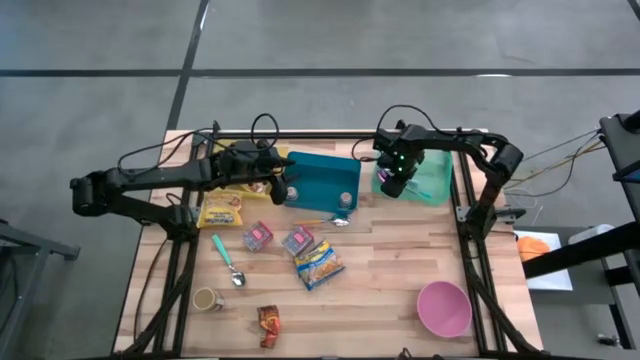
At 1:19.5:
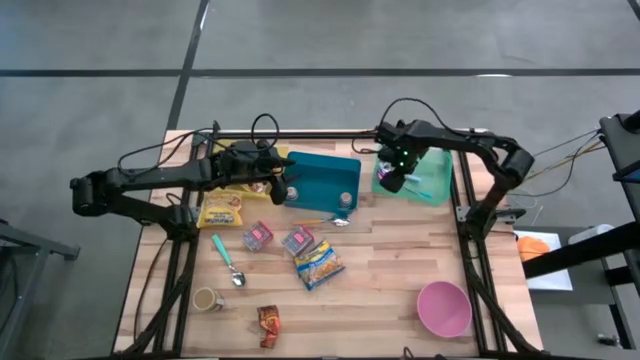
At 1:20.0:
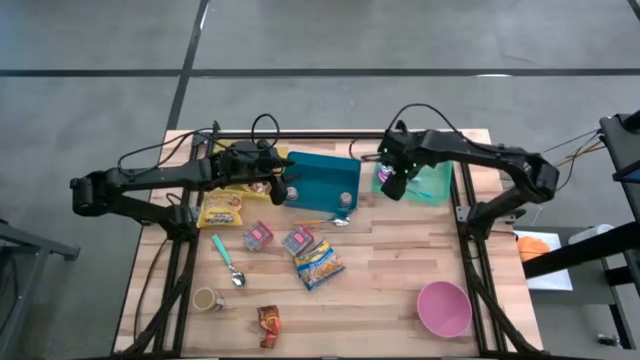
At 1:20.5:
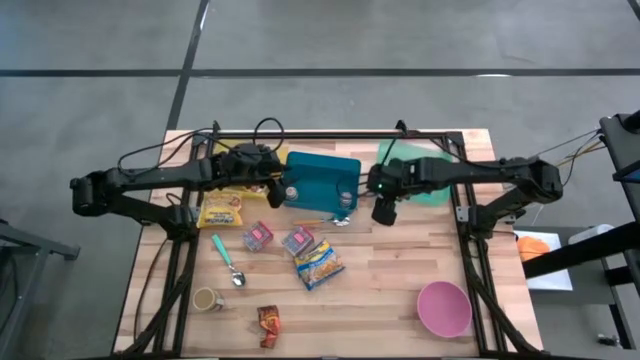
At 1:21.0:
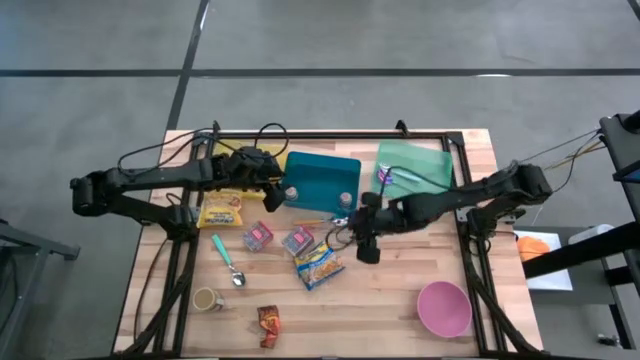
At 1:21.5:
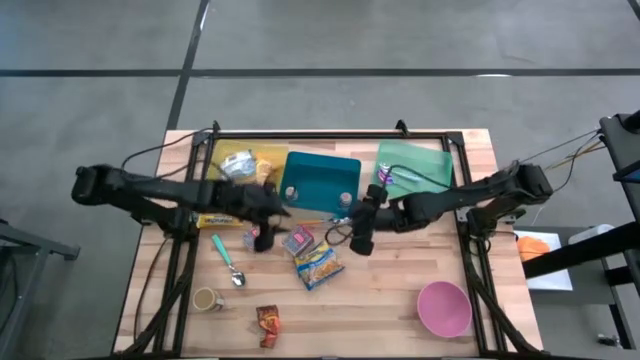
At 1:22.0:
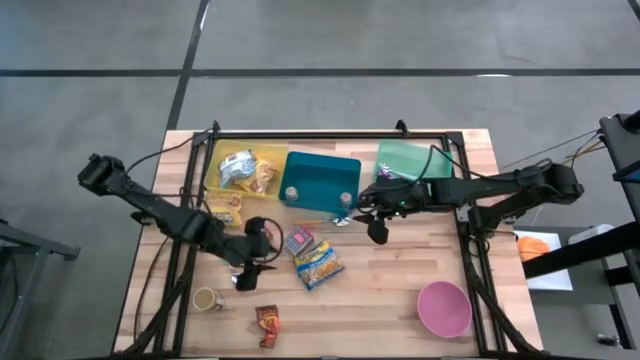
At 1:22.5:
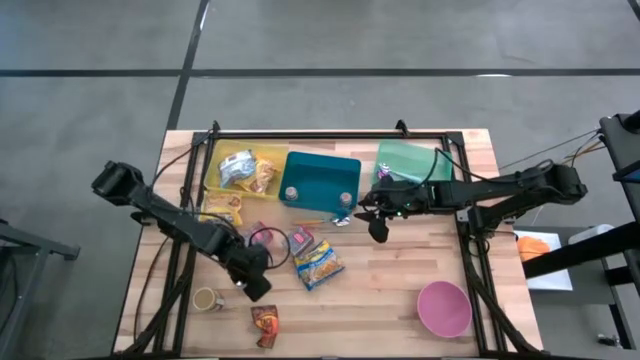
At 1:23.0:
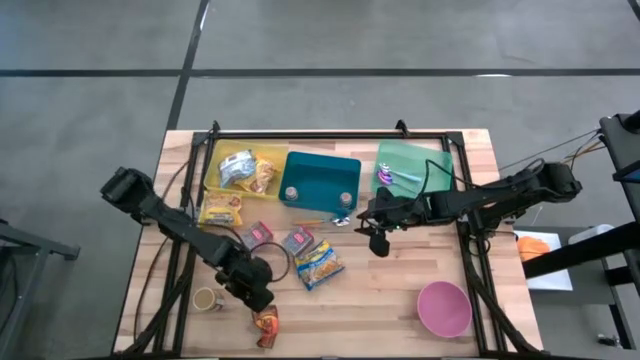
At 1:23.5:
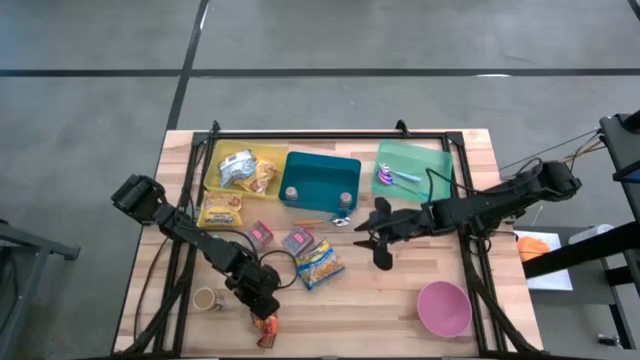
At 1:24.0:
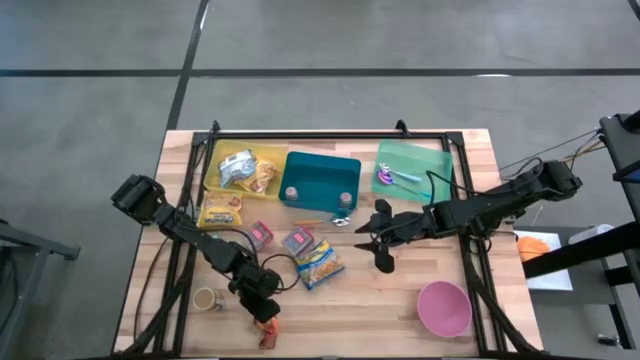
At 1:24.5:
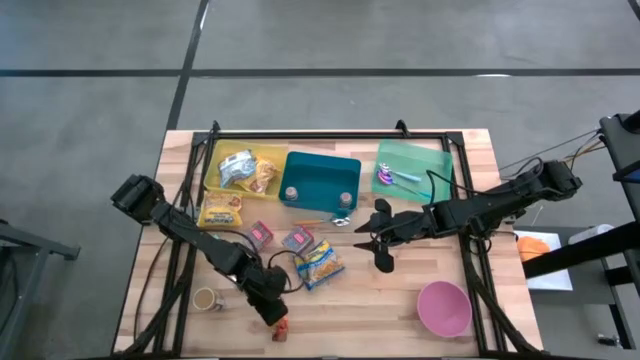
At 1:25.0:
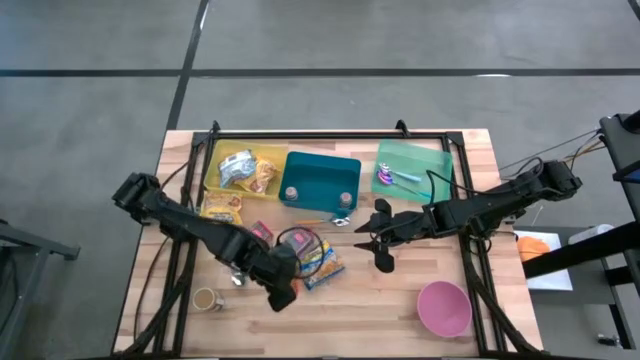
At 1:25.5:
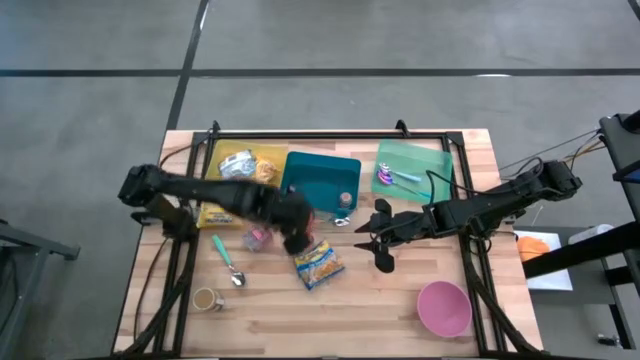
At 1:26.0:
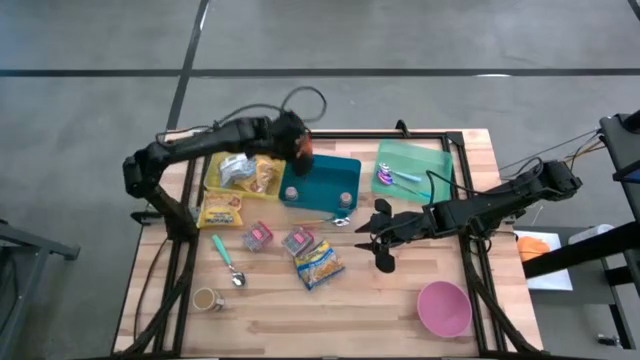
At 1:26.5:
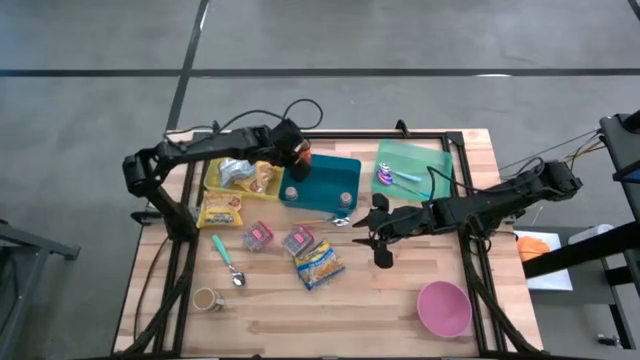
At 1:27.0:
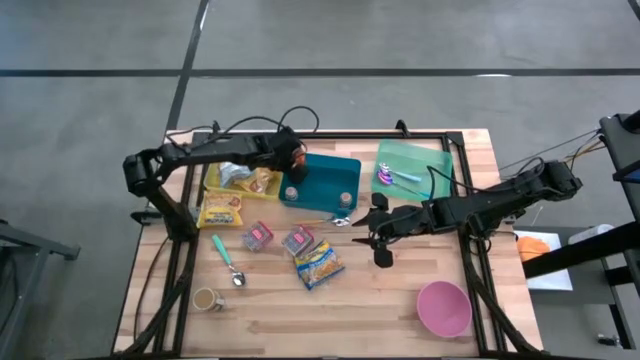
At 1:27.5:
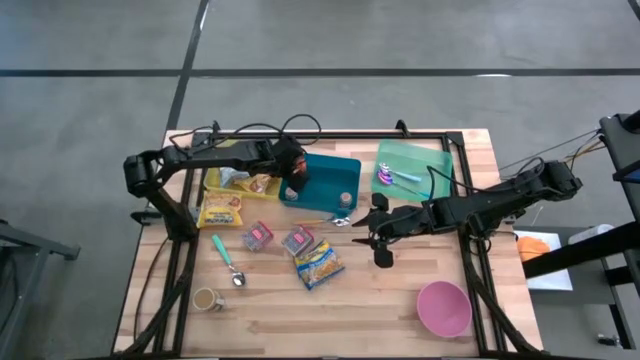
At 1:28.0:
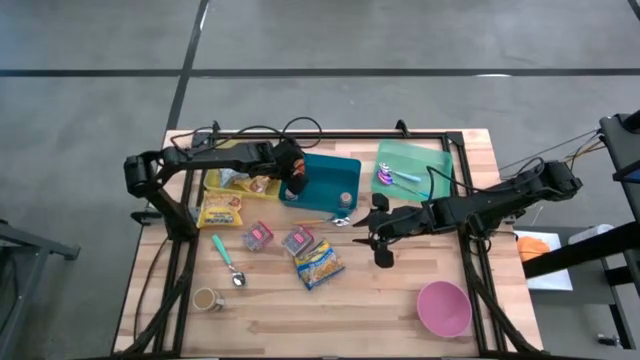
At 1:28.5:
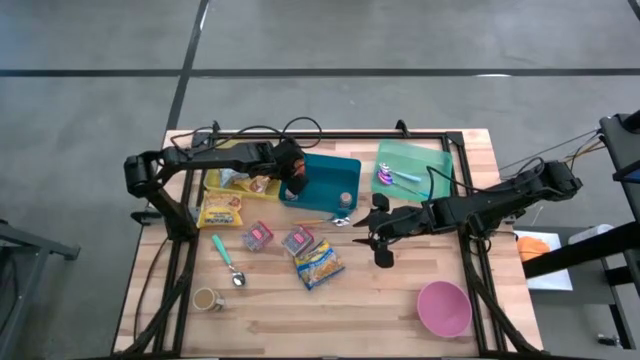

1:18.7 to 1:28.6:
Put the orange seasoning pack into the blue bin

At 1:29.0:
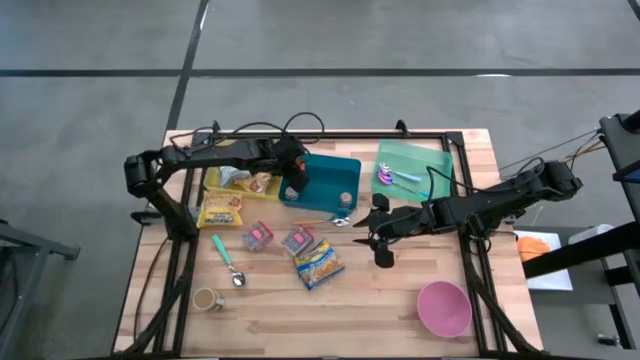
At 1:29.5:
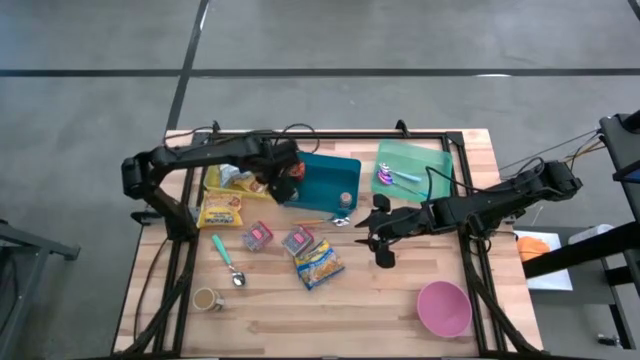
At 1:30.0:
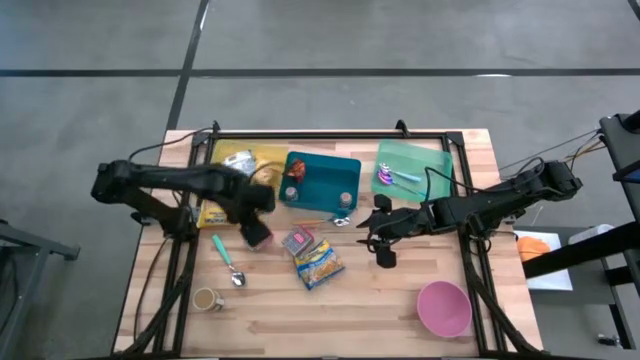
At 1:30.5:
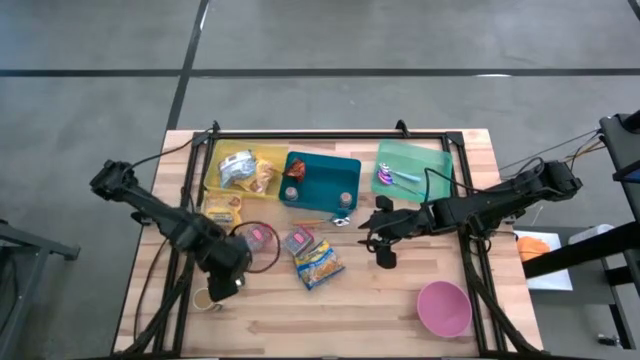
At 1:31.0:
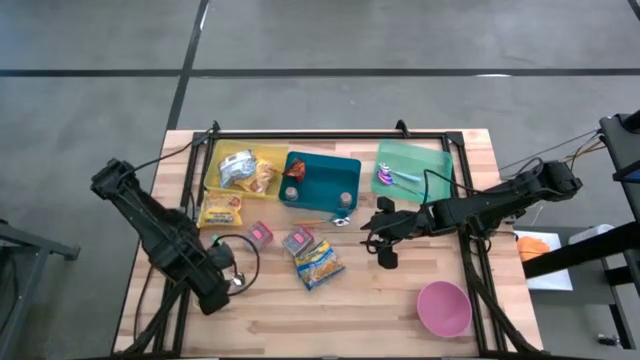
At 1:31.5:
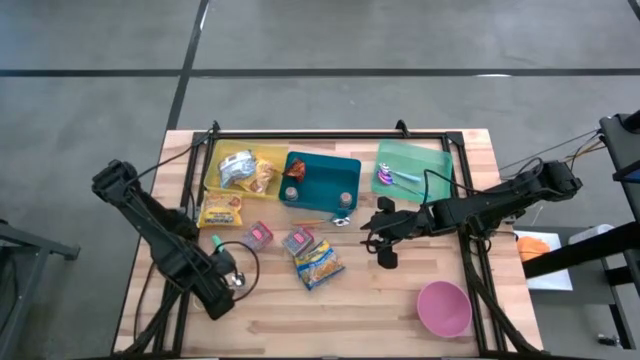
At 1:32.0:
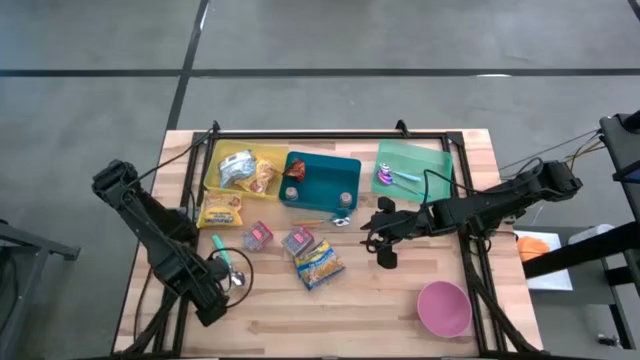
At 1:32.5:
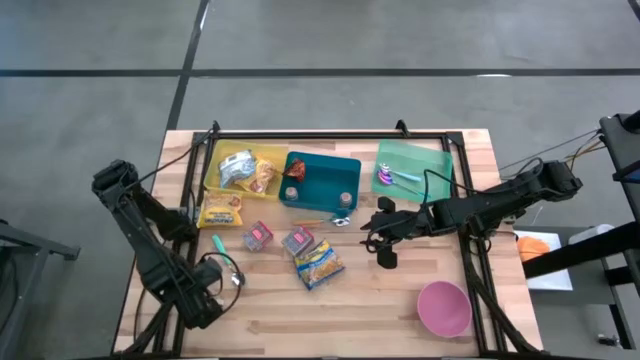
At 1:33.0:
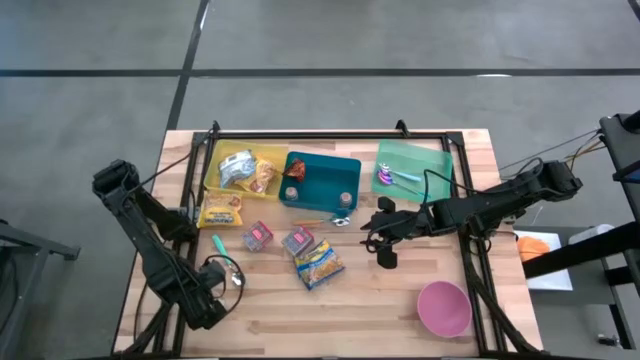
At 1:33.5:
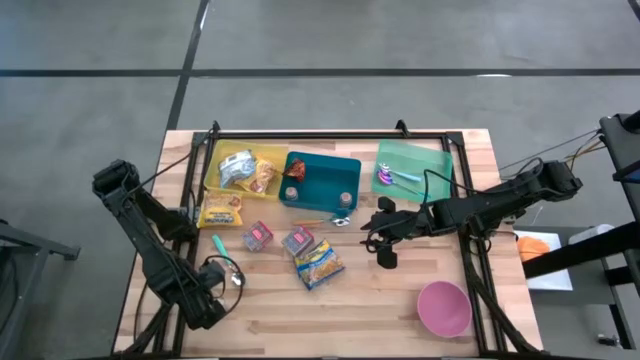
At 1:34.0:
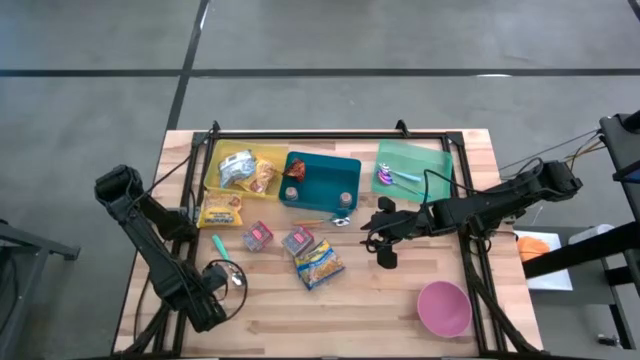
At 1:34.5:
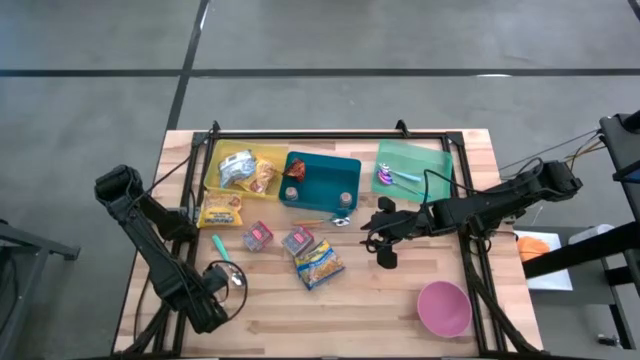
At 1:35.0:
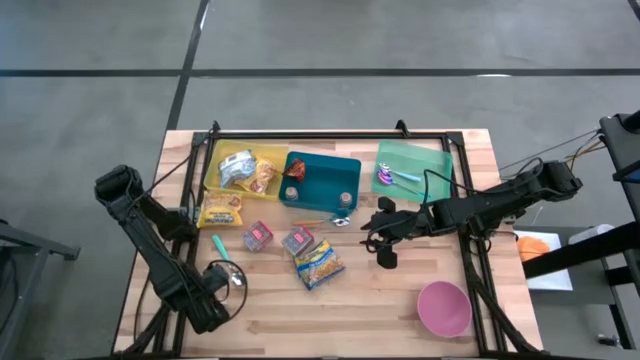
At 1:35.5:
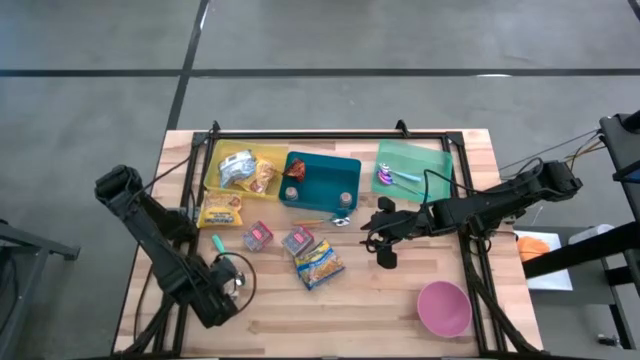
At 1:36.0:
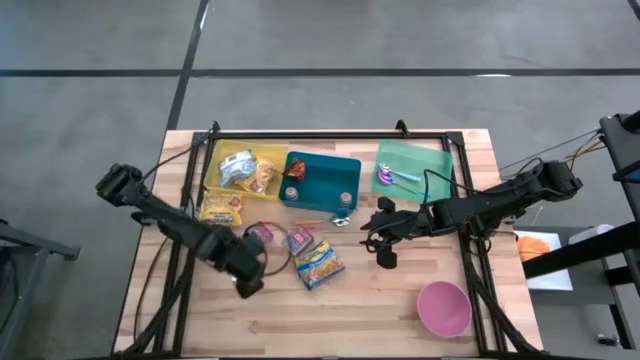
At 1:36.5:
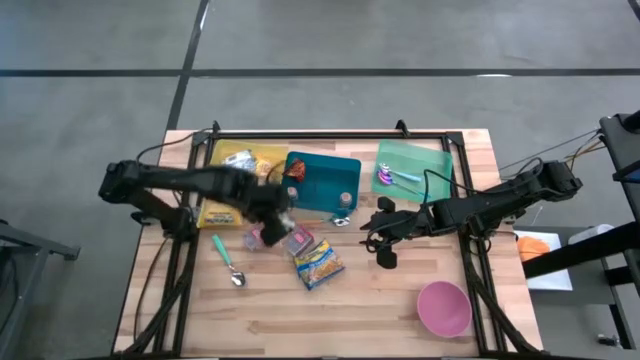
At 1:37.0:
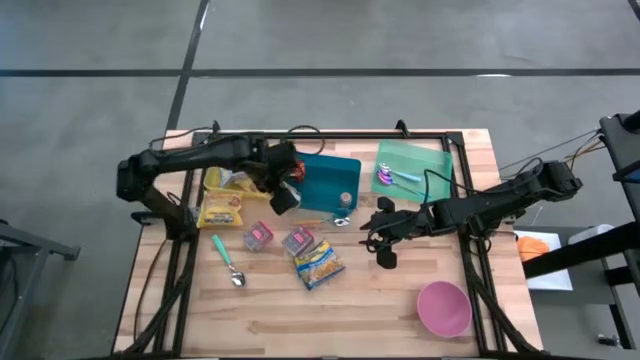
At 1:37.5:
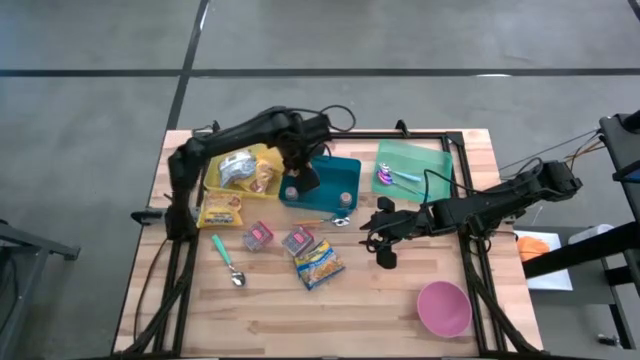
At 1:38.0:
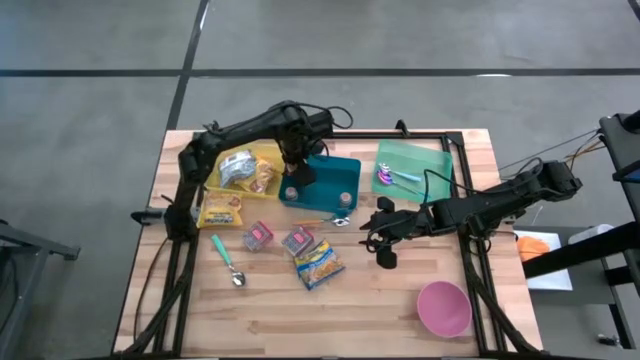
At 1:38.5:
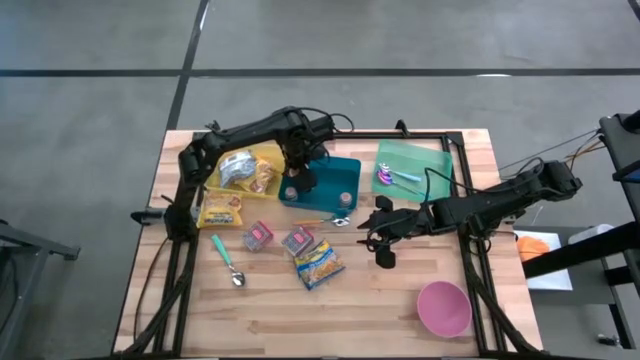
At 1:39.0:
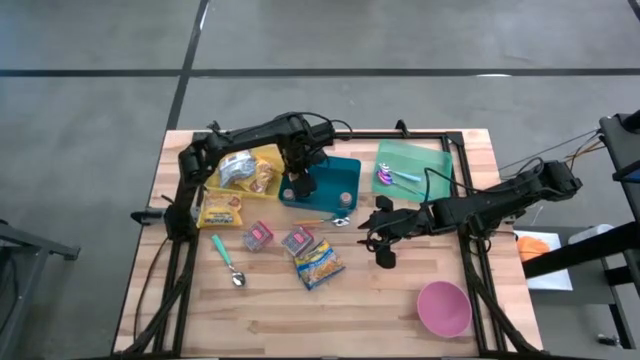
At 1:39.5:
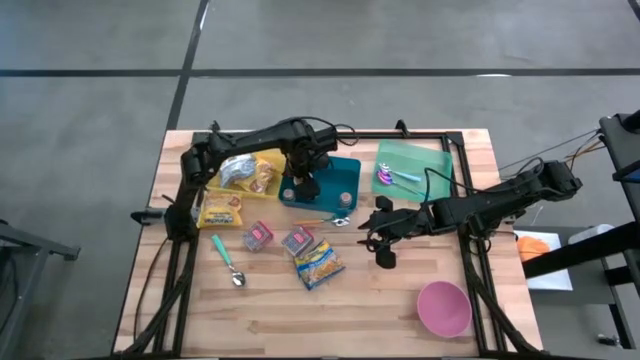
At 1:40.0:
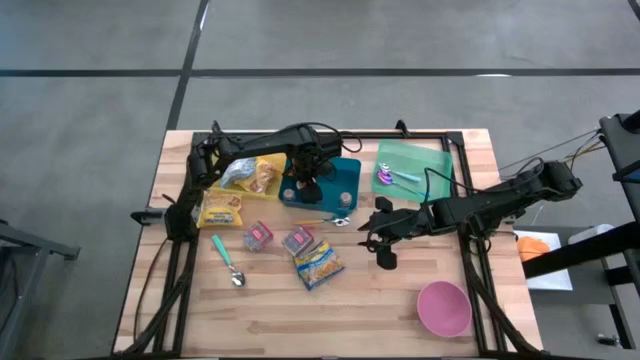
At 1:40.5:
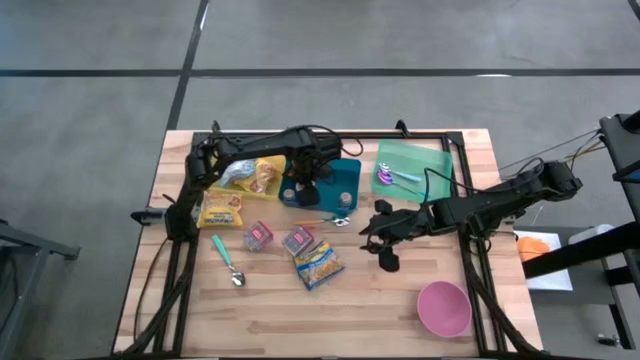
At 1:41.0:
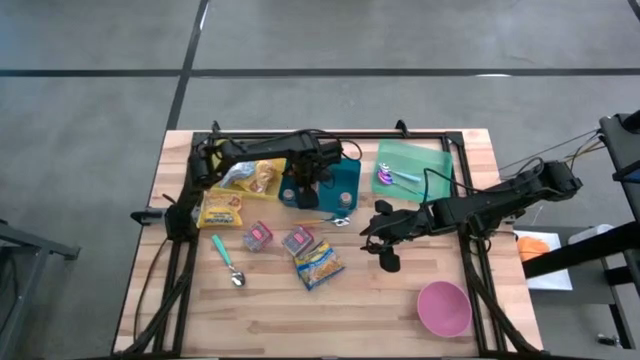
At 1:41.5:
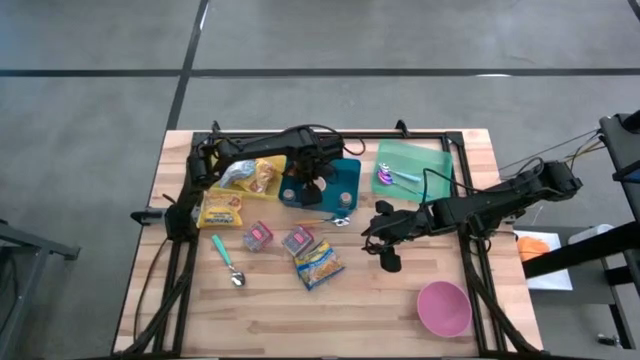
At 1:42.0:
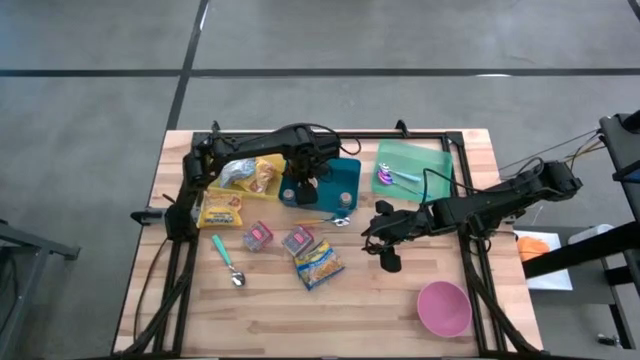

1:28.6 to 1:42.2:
Put the gold seasoning bottle into the blue bin
